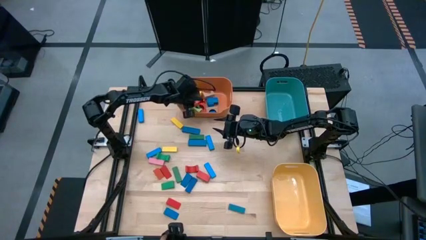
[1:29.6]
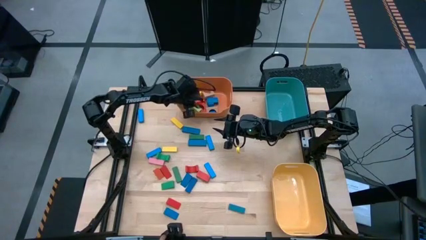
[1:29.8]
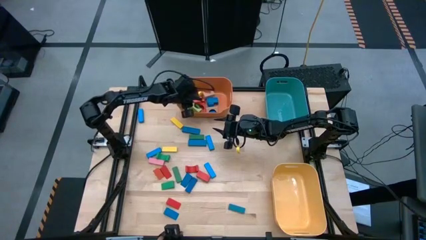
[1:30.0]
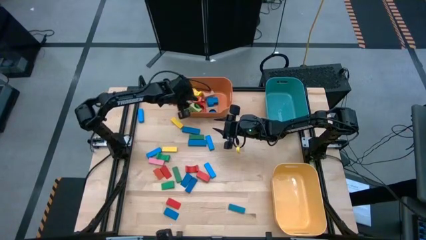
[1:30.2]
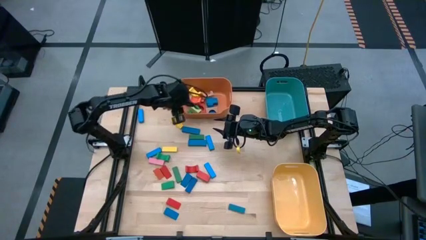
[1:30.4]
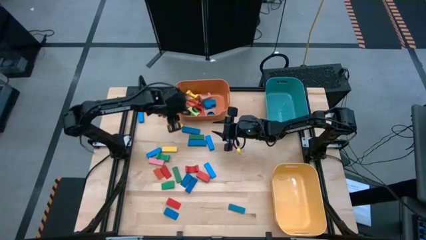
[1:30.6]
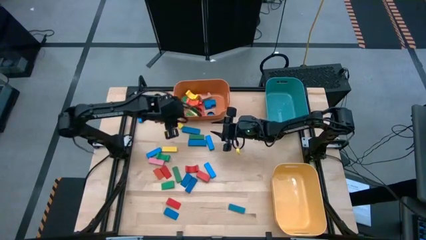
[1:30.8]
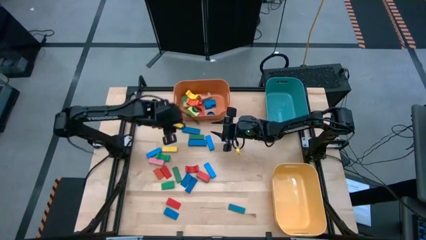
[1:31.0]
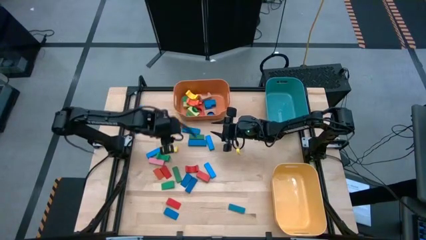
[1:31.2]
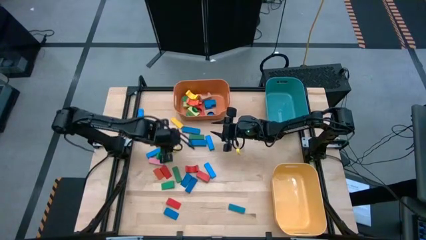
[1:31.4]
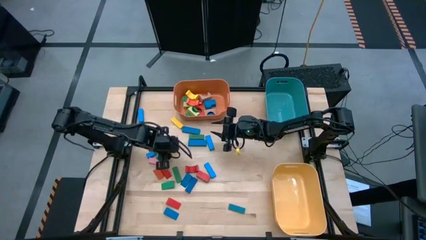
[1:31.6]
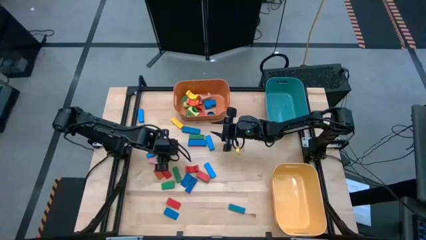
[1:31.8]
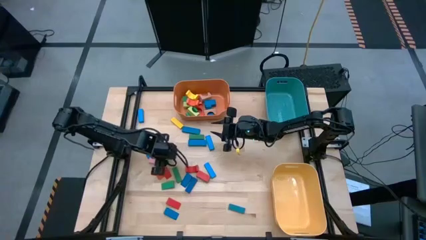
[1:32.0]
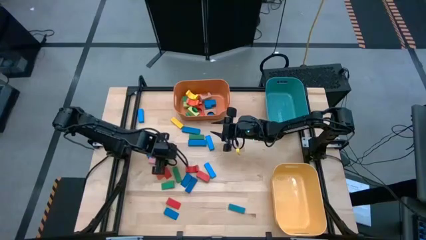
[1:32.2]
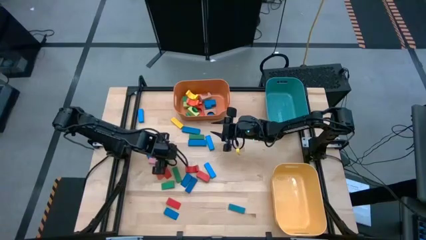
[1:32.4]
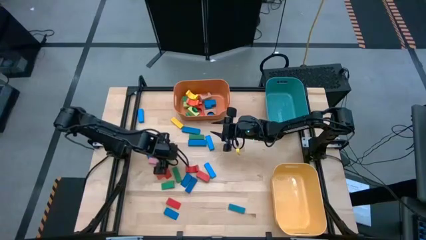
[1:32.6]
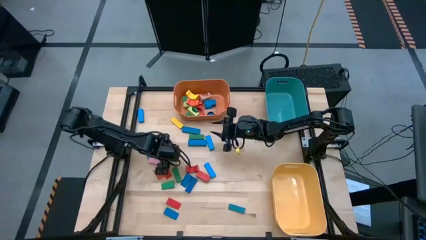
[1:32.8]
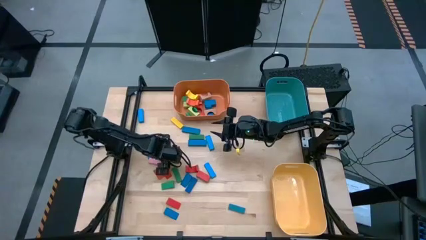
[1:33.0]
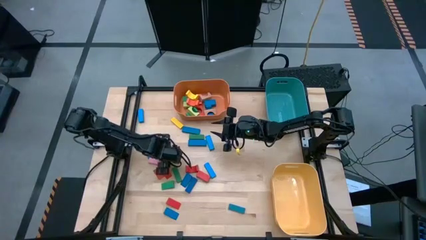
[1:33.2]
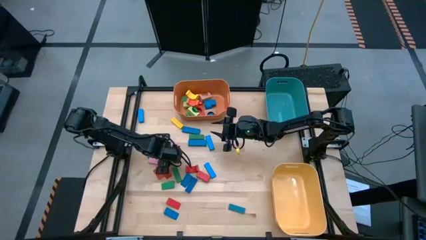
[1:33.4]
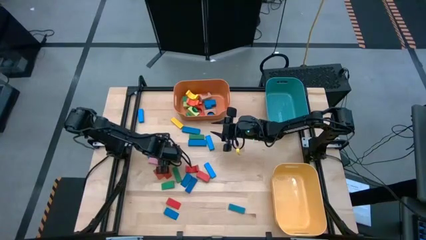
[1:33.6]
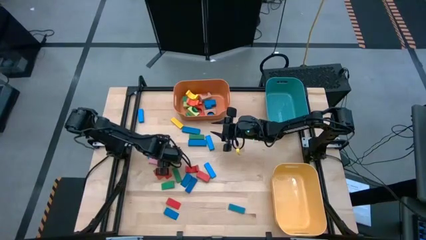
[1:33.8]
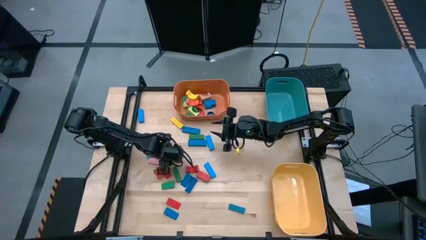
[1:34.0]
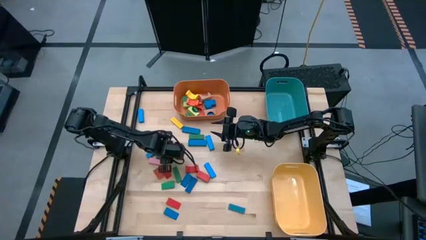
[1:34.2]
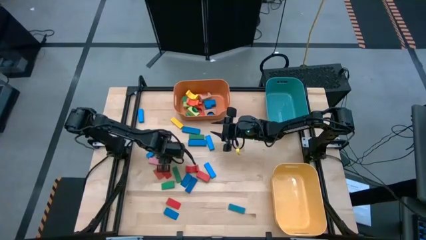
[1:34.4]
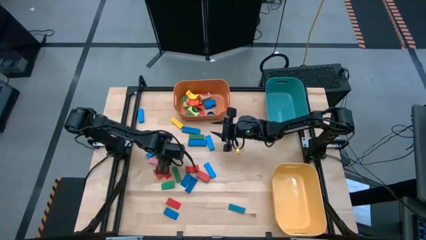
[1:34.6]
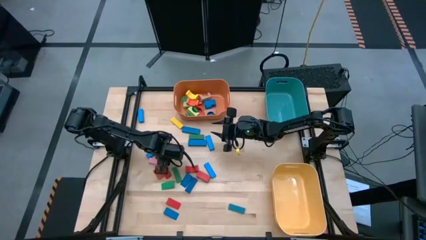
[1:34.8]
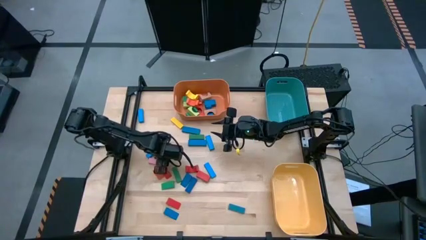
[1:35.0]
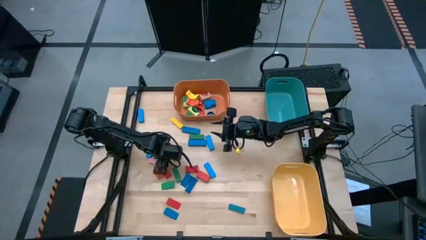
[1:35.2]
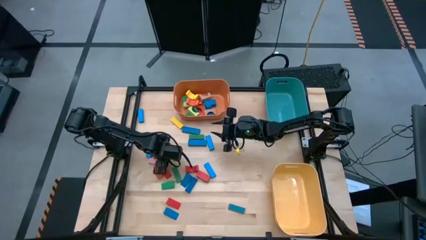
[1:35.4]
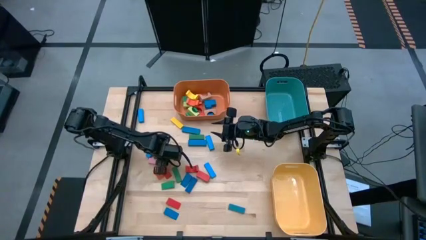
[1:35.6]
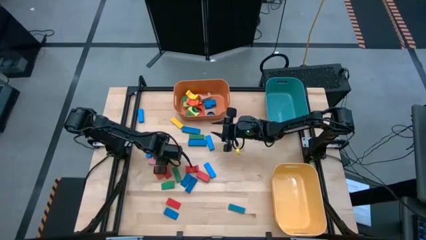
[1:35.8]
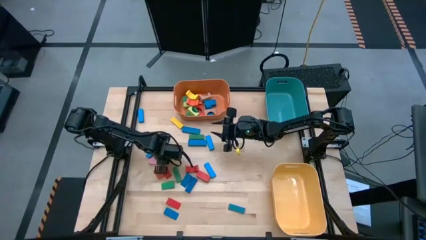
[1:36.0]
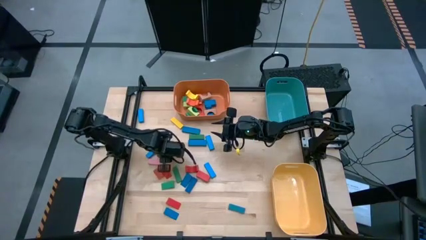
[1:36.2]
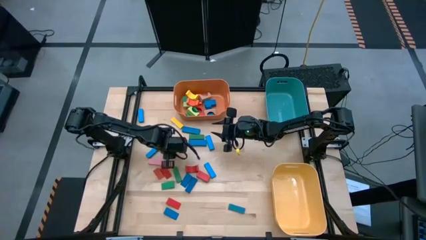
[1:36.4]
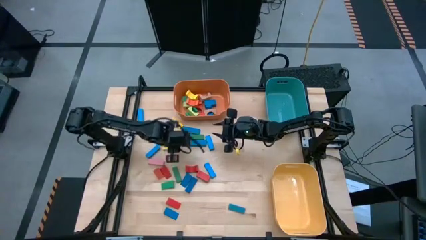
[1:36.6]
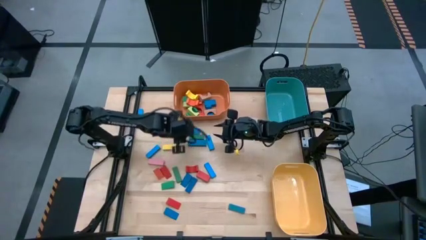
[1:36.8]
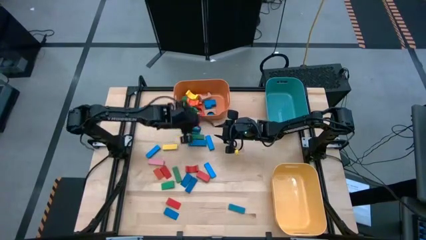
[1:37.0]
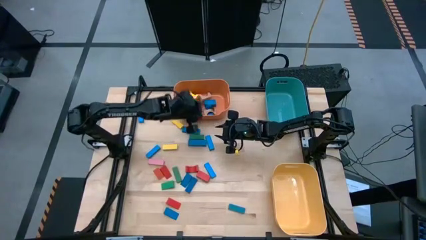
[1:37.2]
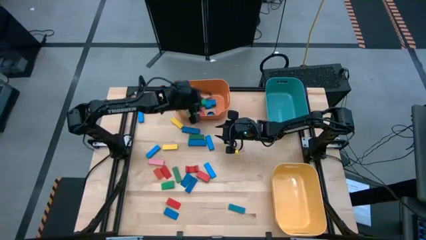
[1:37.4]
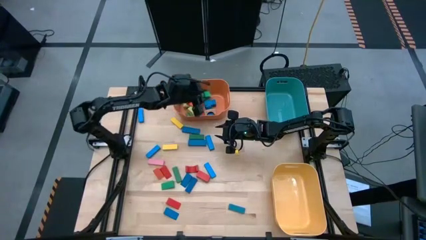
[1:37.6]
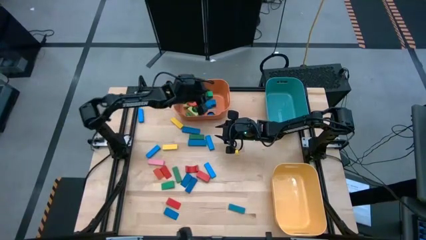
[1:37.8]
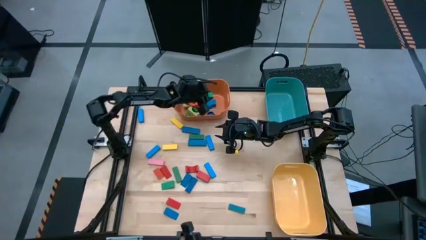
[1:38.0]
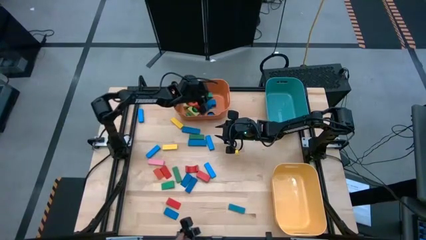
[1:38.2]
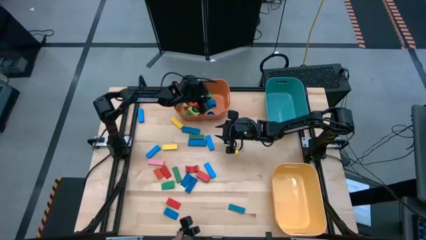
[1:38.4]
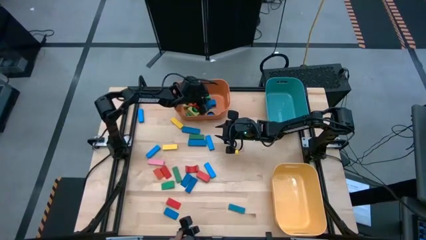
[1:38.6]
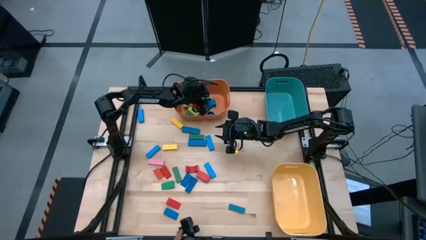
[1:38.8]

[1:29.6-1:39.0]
Task: Sort blocks by size
Put the green arch block into the orange bin

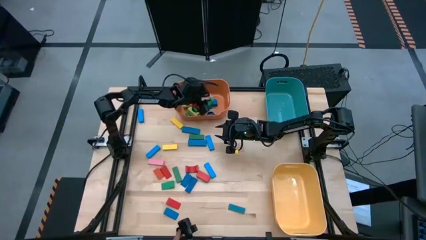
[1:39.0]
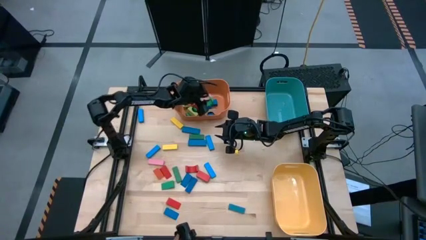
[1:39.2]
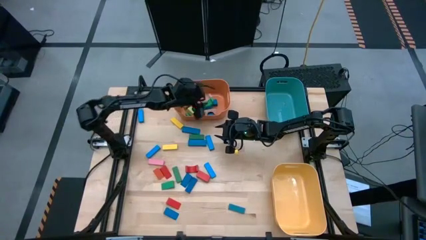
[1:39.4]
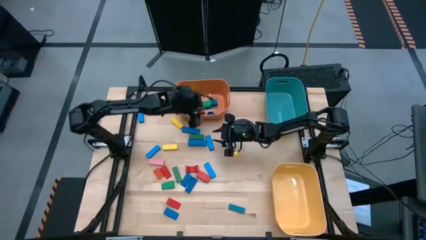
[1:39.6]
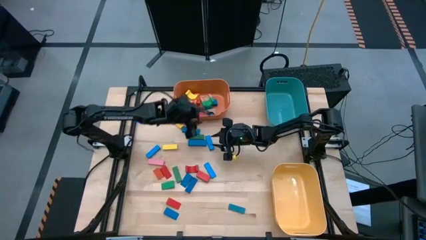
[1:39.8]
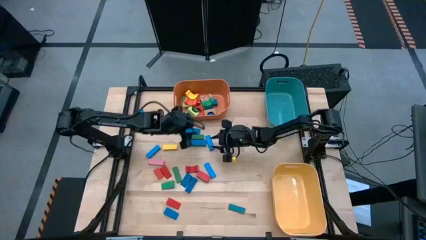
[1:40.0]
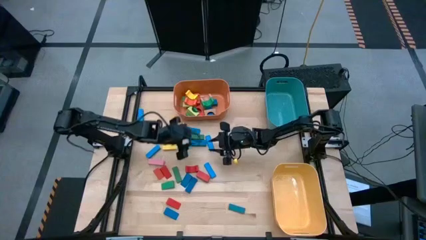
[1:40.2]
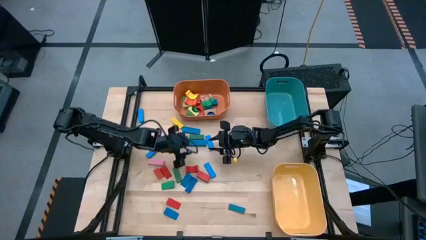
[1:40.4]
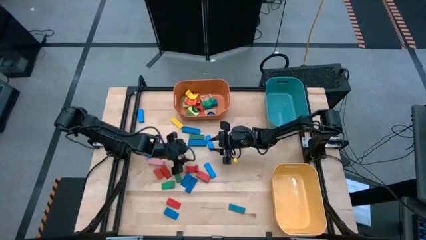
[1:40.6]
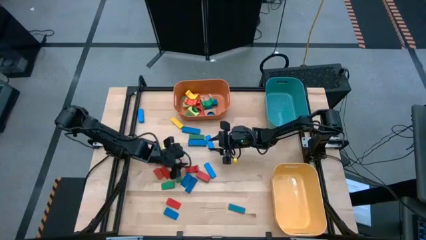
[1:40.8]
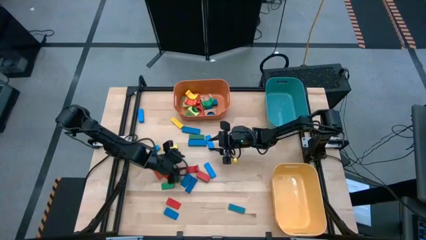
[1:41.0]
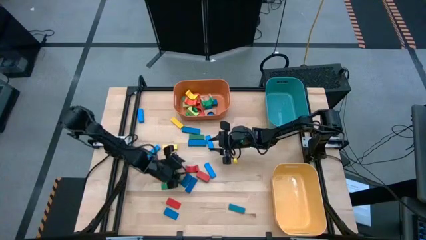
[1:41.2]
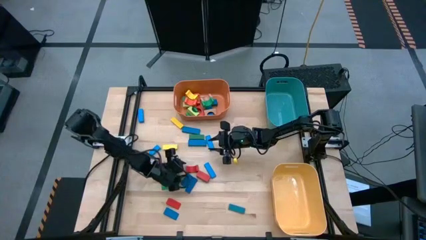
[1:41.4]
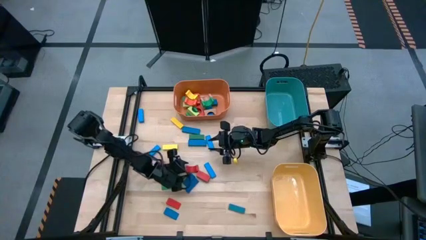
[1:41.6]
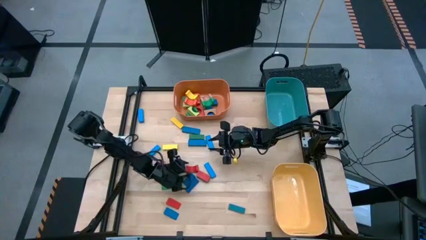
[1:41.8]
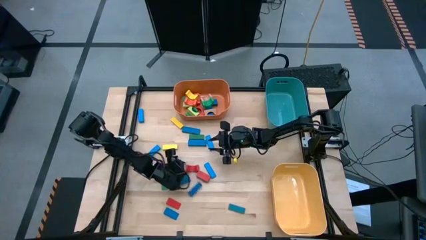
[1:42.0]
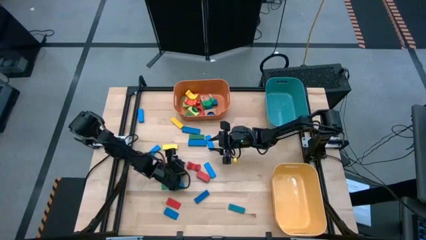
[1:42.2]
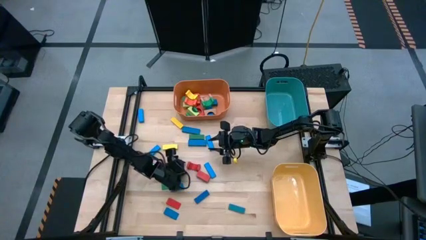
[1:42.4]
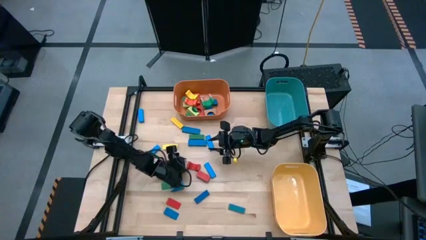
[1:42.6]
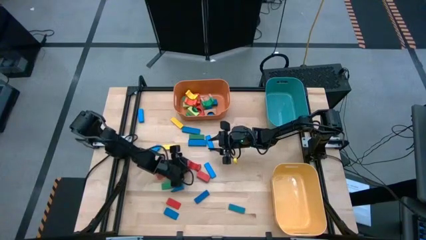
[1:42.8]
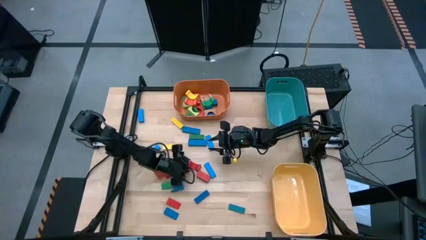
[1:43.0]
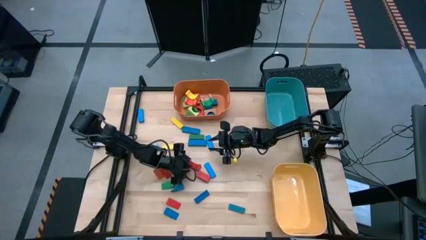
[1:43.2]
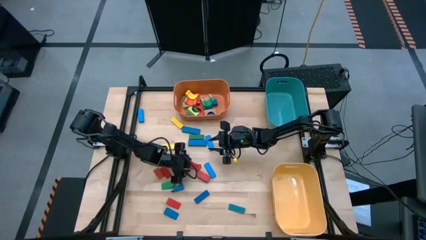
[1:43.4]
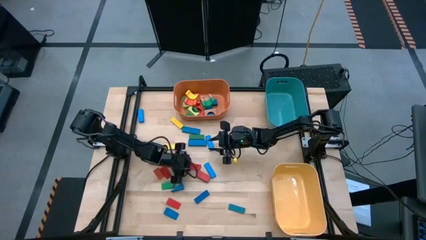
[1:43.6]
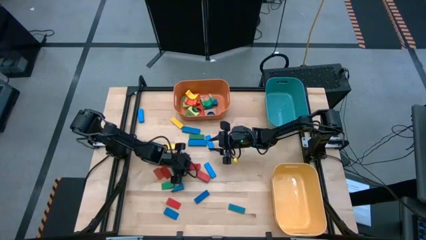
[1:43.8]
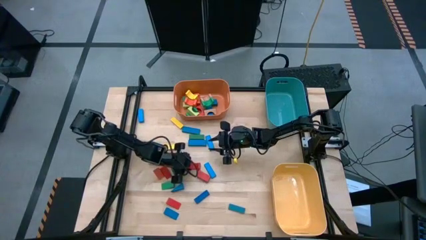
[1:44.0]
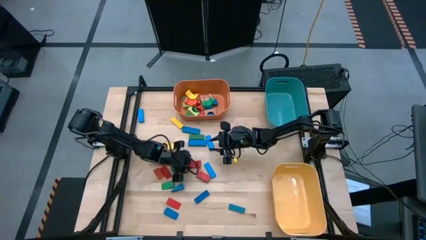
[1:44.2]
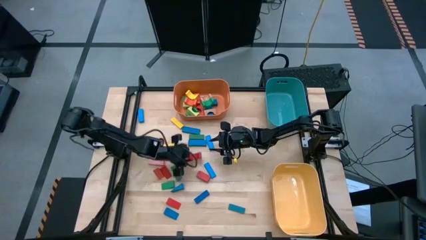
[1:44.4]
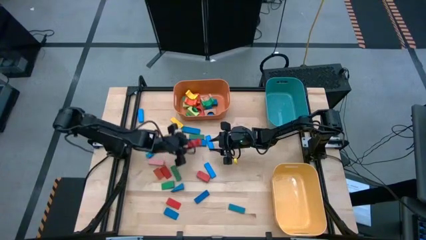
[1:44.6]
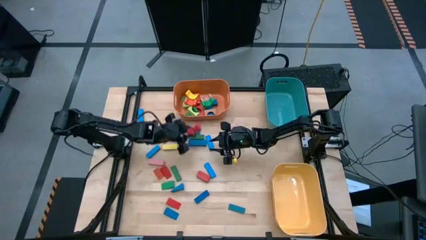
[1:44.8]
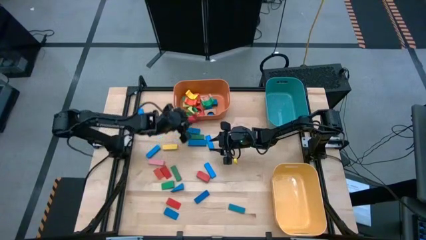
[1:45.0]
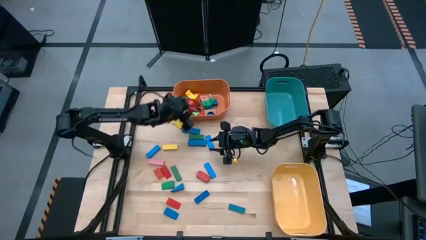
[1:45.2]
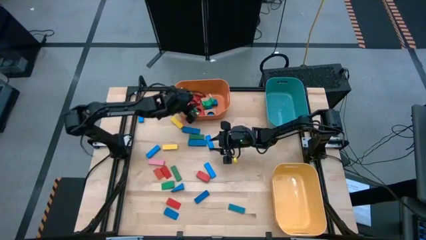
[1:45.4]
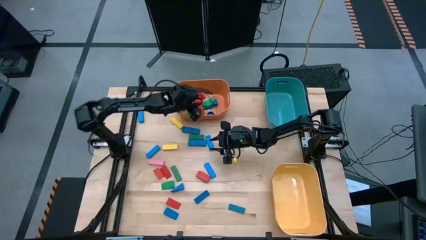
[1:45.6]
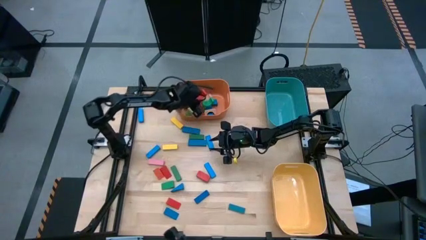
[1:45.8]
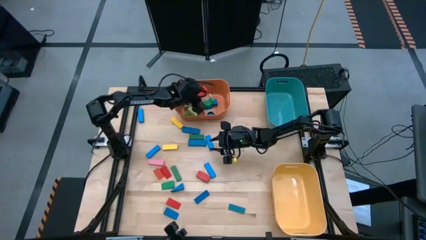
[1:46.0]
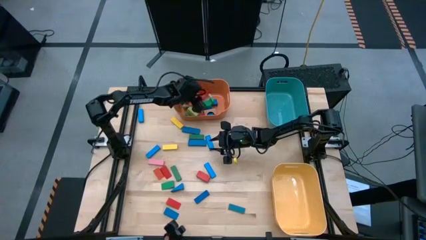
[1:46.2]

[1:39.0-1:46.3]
Put the red arch block into the orange bin
